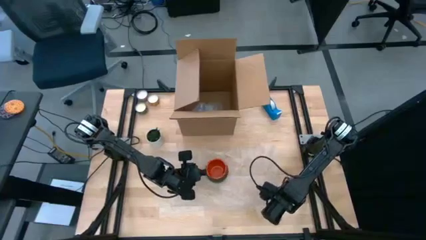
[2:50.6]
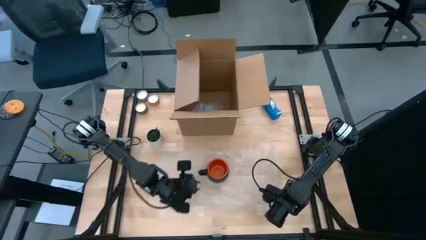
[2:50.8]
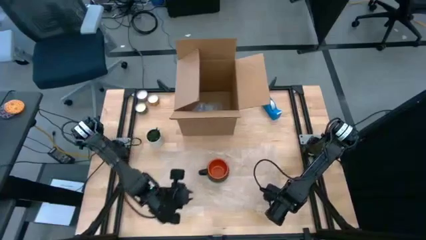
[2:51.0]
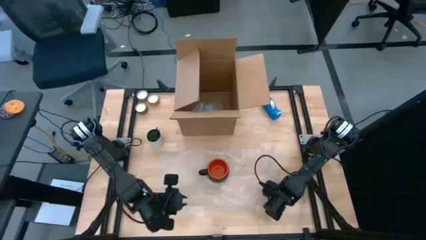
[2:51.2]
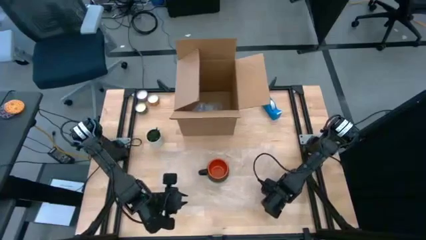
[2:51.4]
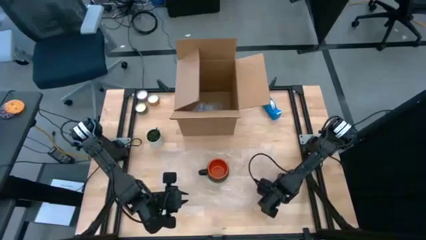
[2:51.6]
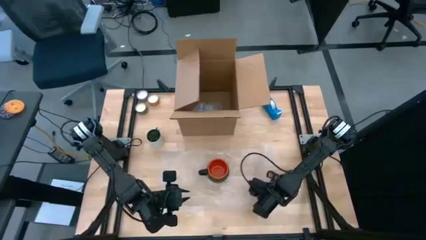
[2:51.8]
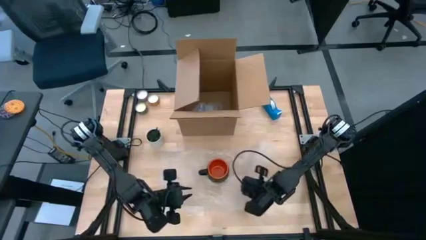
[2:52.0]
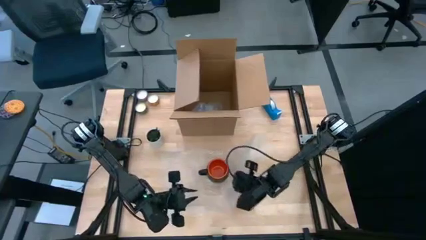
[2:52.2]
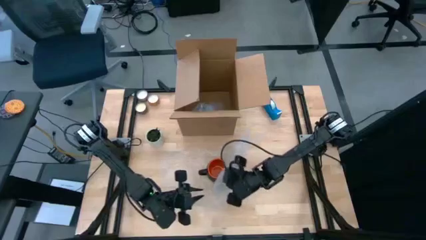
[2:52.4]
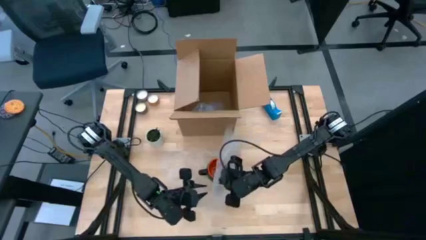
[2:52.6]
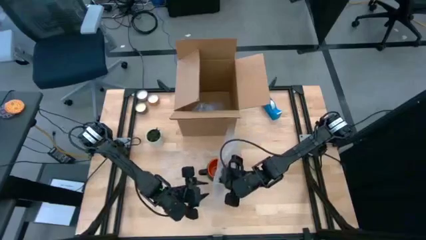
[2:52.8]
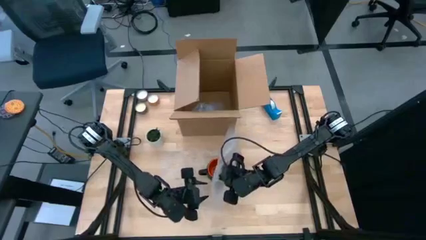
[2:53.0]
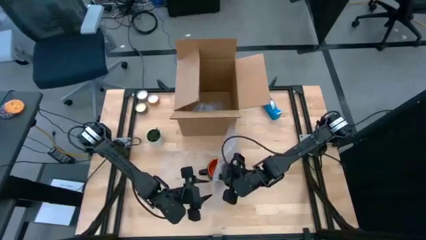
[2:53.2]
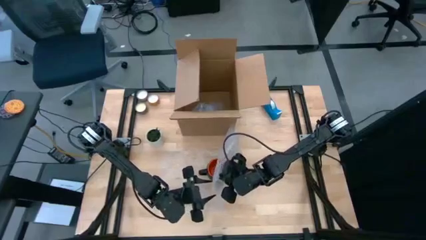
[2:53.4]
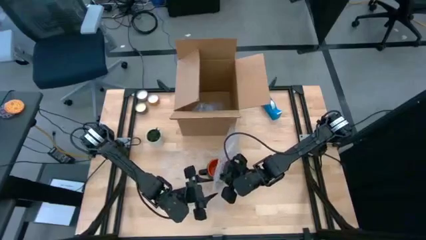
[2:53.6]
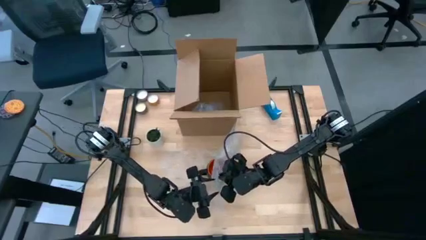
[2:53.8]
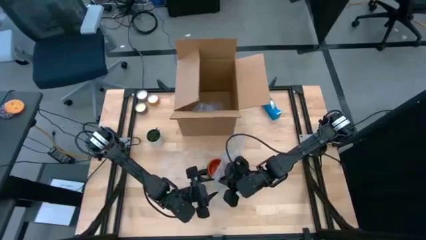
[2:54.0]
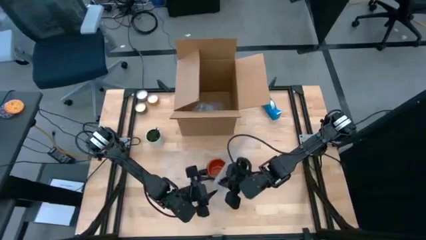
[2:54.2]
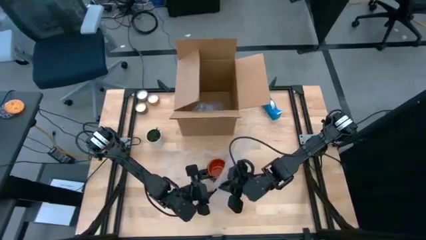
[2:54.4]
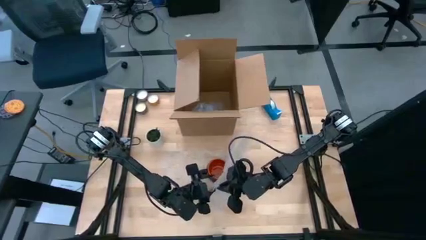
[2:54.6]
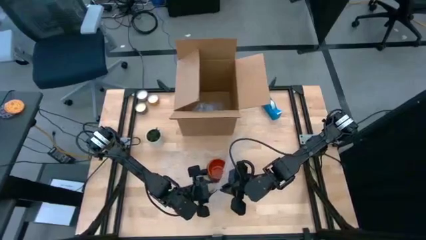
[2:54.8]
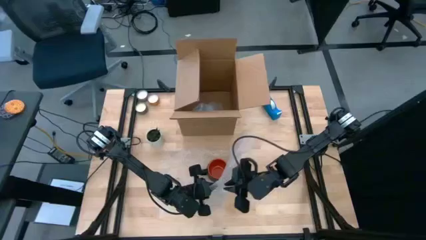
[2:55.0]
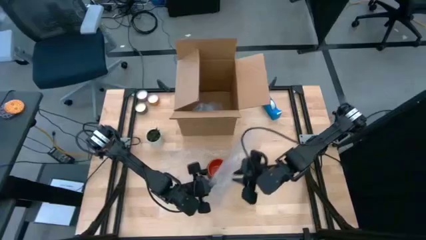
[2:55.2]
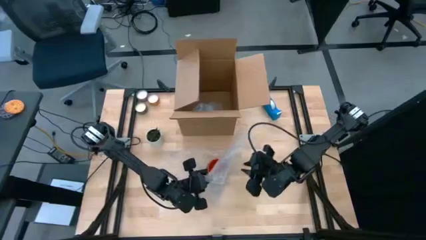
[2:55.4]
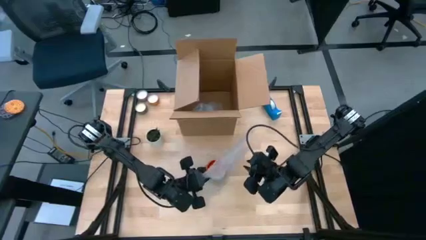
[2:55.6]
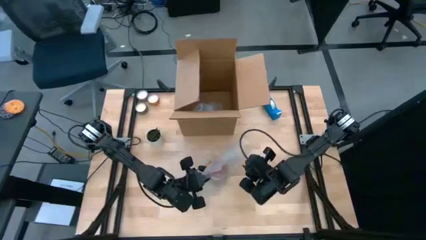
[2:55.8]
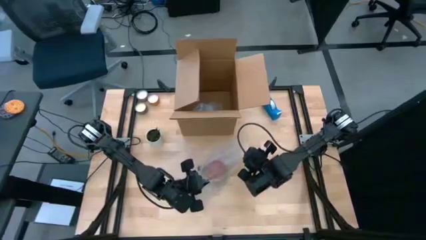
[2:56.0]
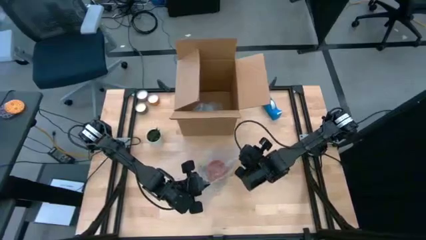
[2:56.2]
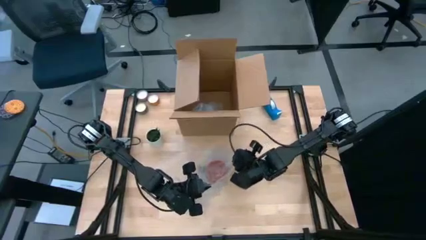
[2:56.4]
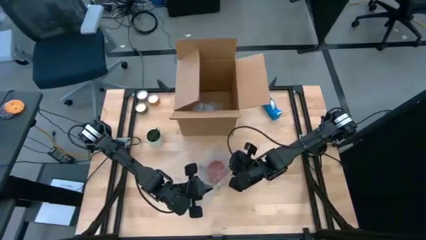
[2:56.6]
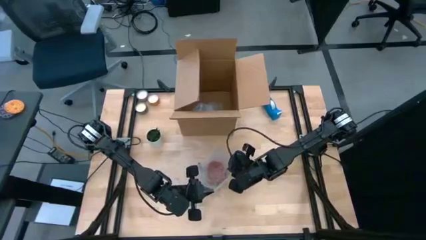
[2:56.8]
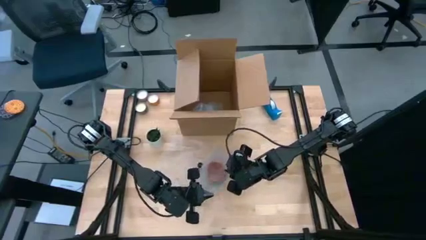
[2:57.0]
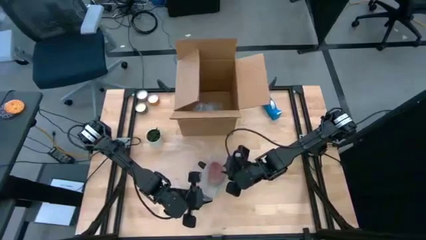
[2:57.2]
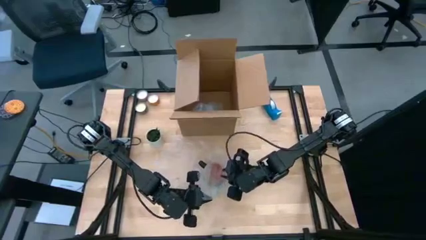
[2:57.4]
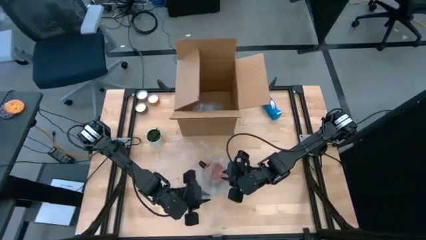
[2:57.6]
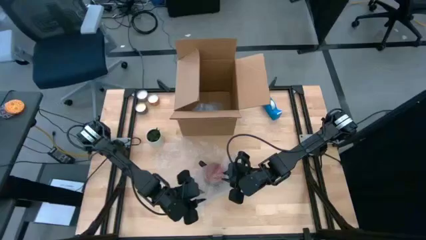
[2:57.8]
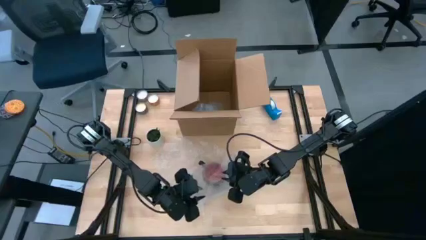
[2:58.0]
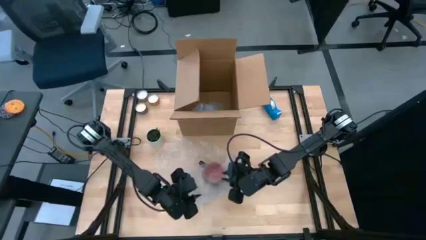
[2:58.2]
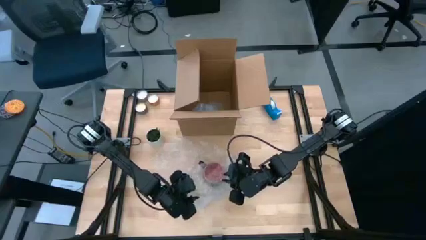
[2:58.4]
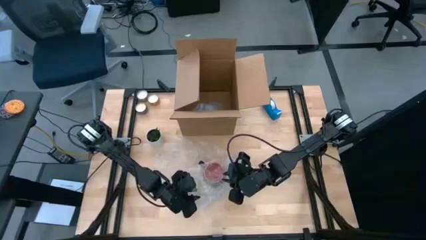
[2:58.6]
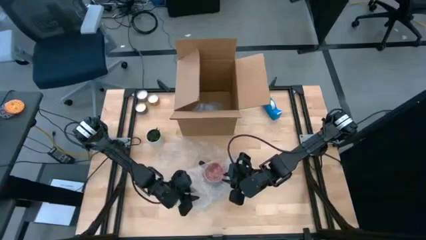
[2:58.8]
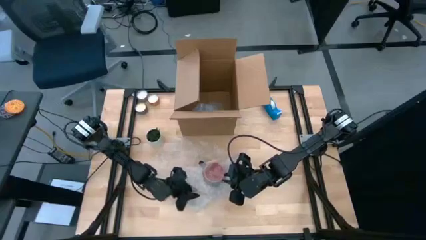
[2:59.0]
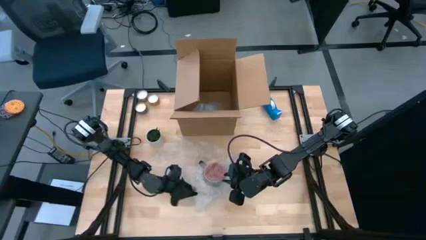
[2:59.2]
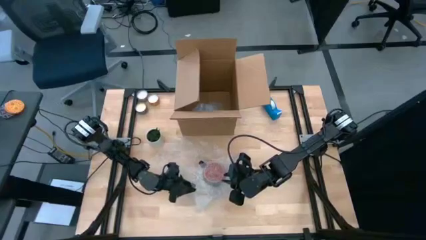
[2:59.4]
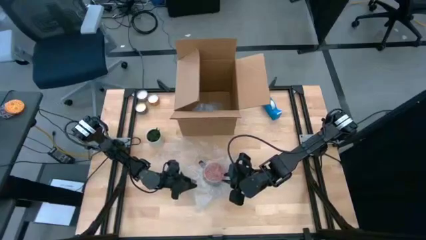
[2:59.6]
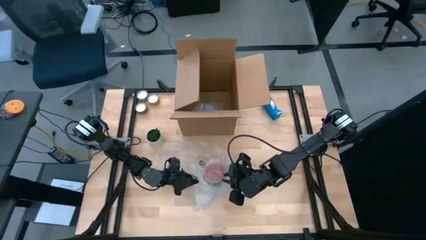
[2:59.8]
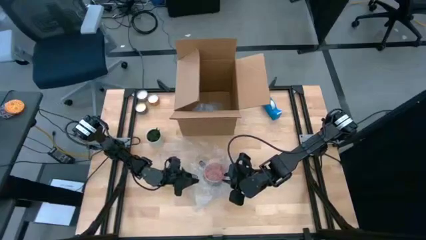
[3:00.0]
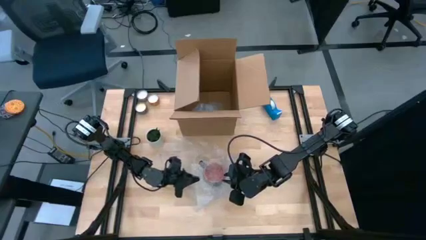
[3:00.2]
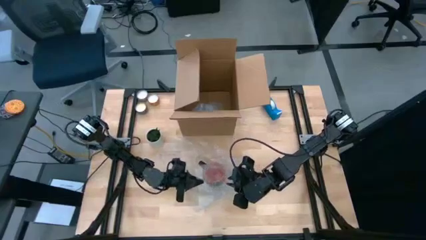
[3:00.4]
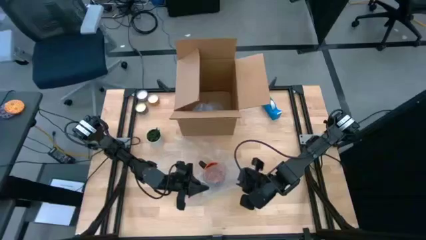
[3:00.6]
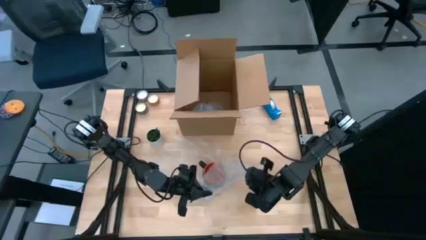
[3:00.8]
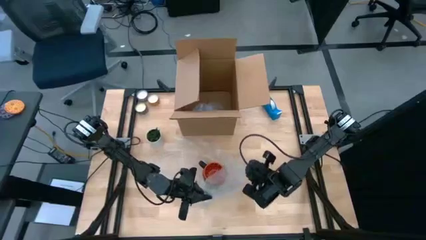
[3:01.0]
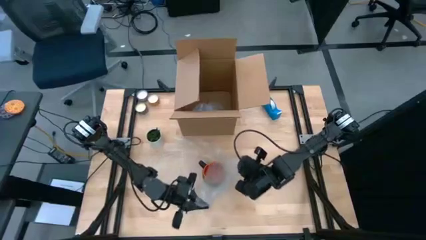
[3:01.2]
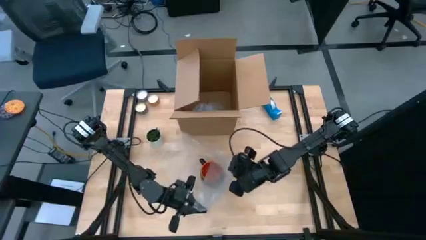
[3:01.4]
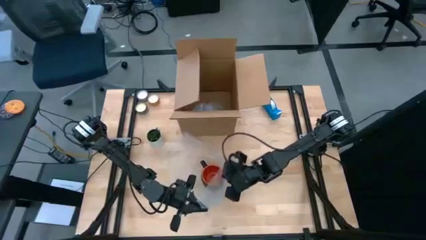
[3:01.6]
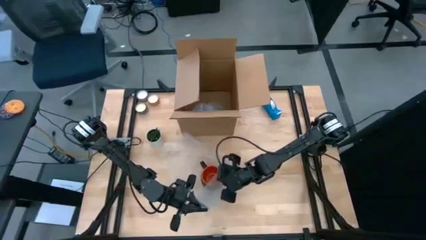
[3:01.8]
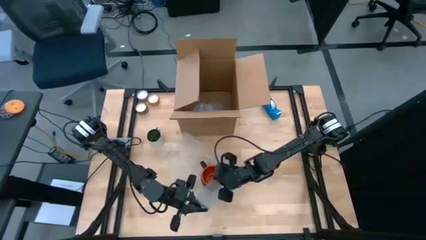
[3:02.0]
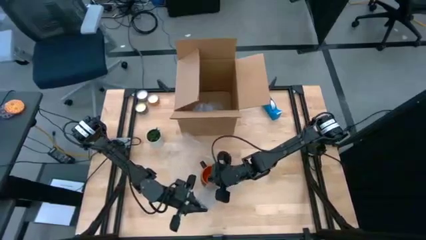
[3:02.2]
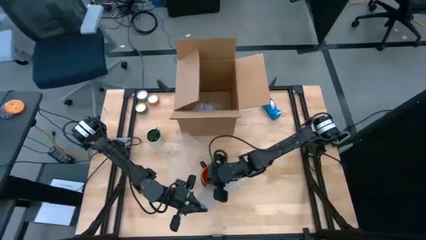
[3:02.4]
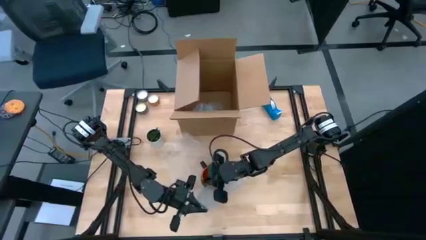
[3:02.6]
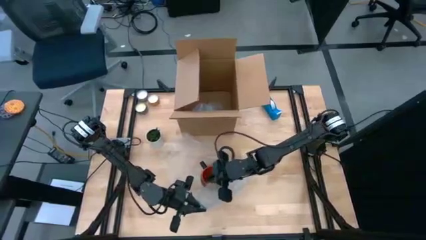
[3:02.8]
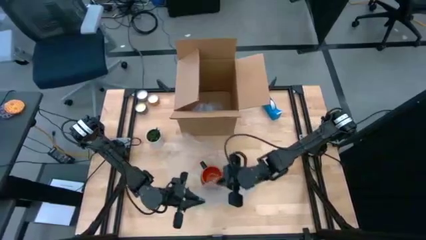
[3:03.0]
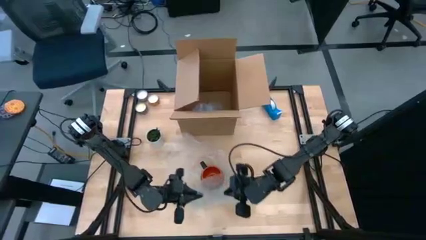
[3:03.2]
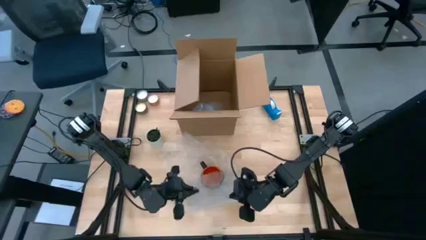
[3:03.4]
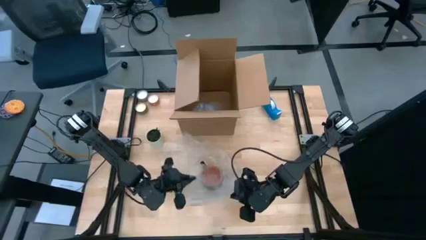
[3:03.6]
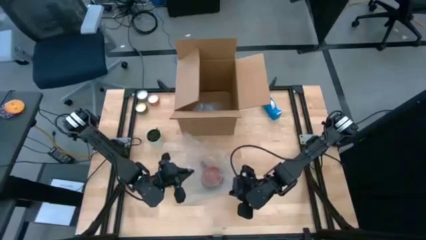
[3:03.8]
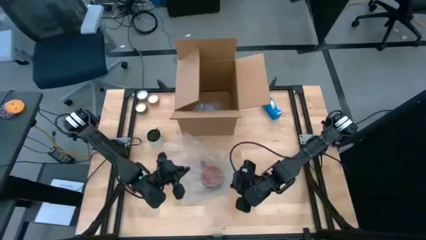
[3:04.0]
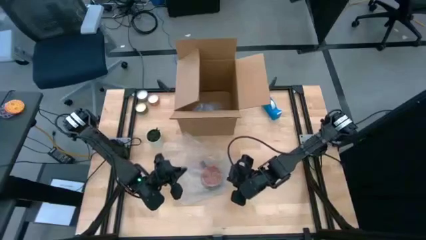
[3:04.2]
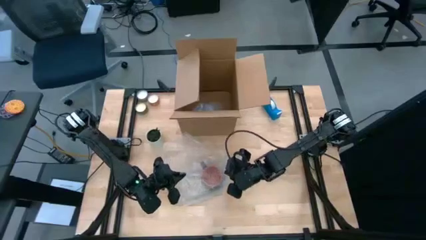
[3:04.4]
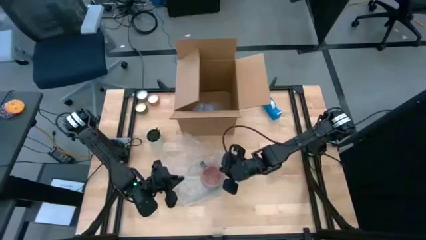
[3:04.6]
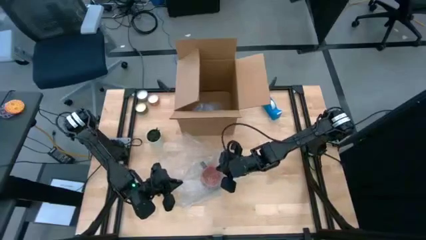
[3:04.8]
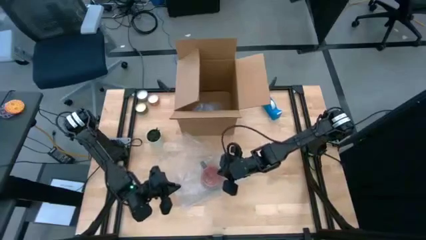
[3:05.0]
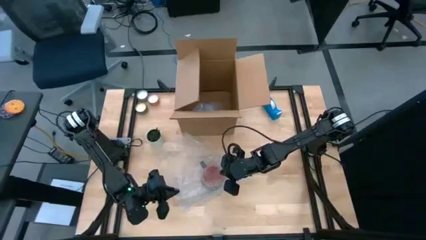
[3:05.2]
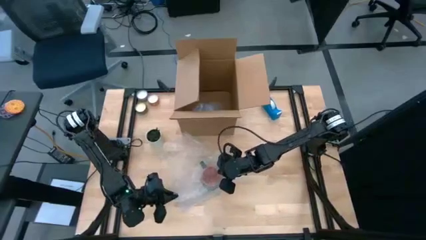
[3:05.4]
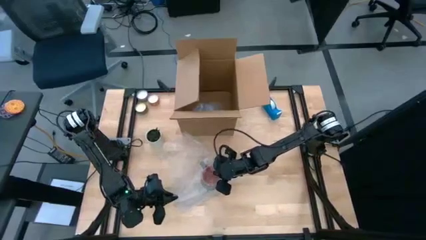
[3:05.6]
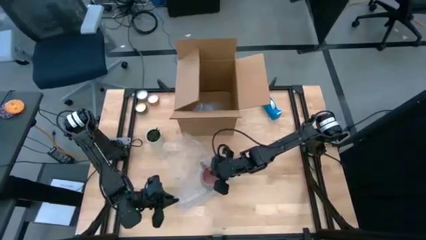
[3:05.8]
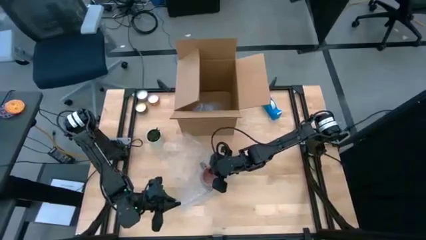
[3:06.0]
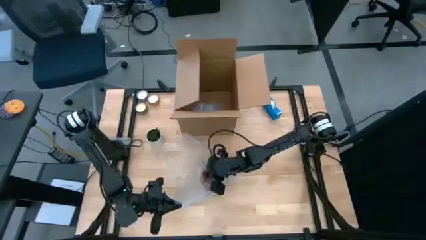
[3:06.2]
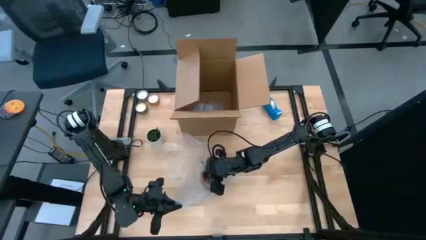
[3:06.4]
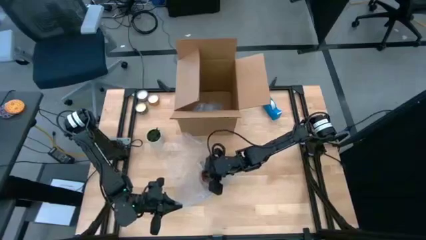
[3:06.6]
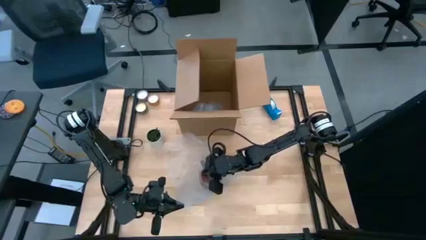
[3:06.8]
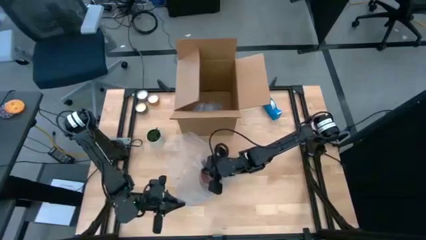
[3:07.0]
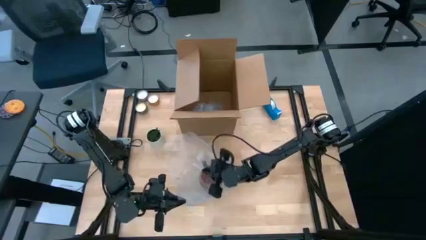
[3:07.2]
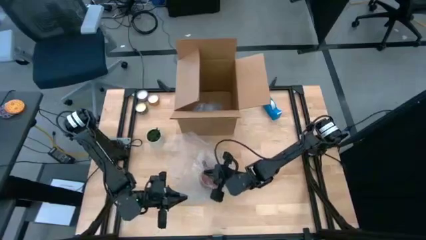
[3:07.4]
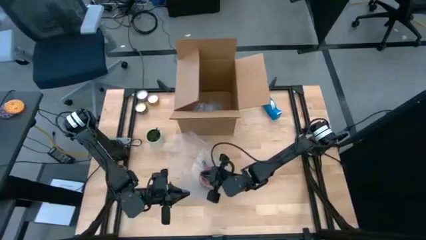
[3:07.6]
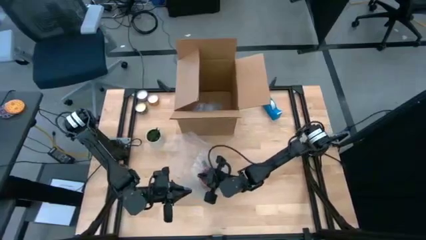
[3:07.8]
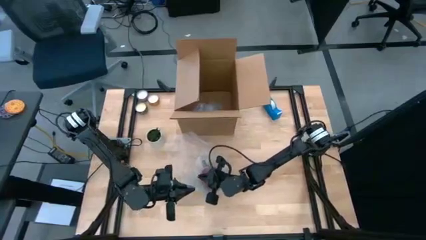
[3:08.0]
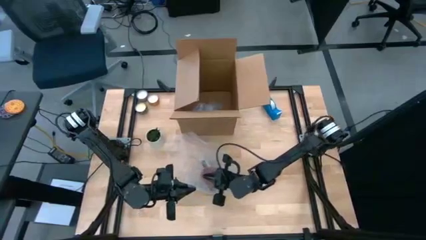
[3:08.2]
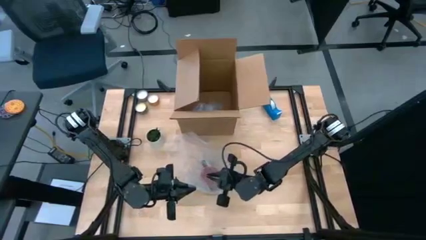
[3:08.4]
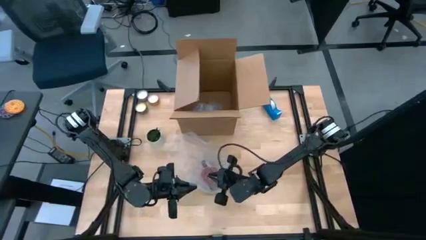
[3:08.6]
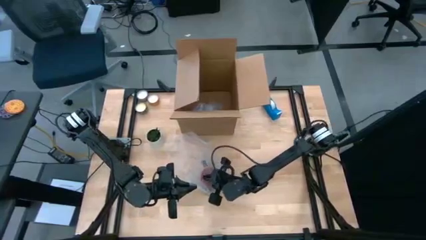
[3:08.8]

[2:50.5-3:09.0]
Task: wrap mug
Wrap the black cup with the transparent bubble wrap
